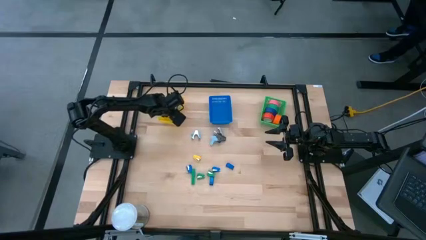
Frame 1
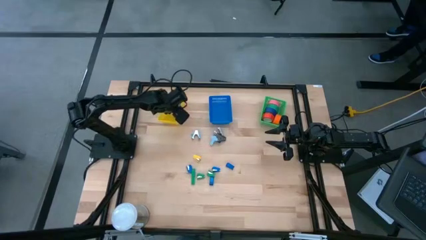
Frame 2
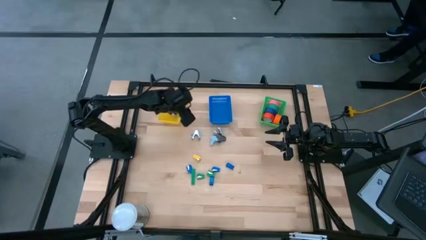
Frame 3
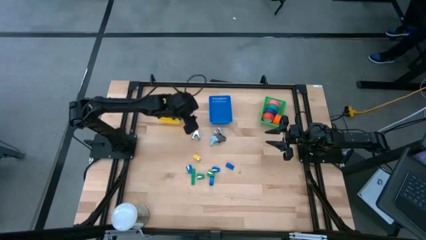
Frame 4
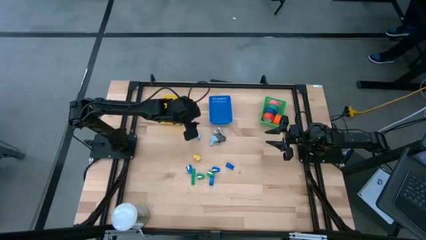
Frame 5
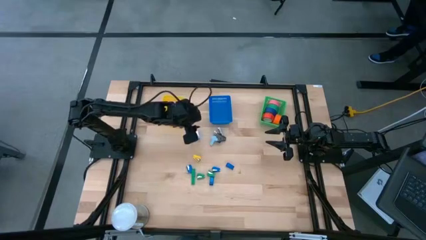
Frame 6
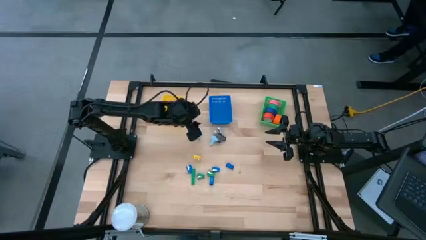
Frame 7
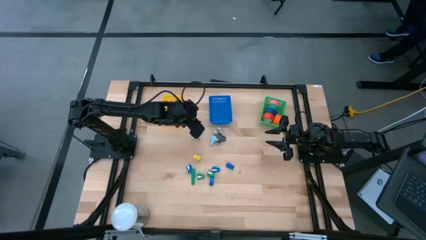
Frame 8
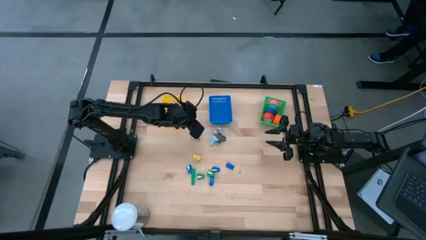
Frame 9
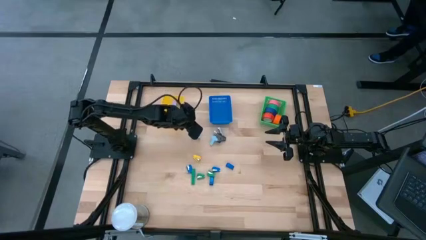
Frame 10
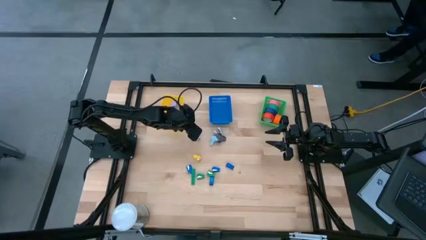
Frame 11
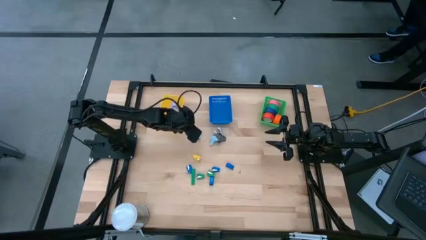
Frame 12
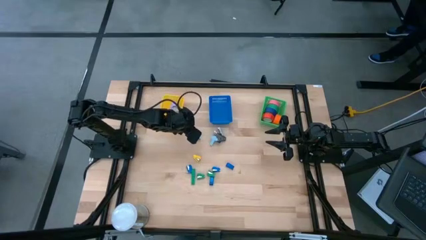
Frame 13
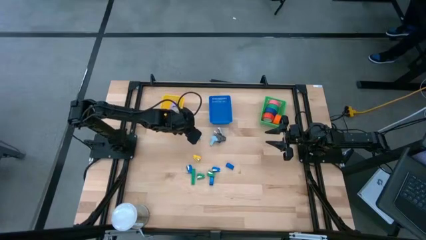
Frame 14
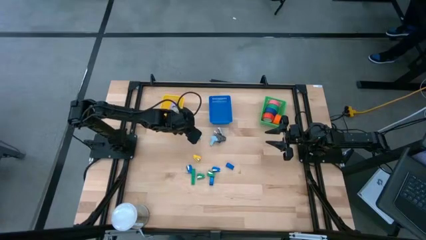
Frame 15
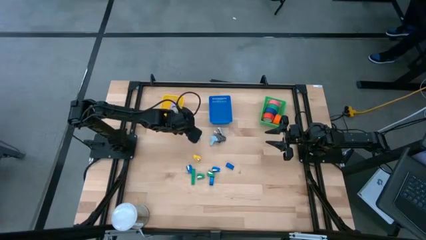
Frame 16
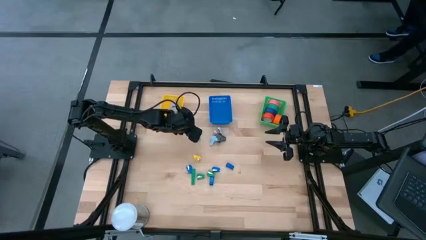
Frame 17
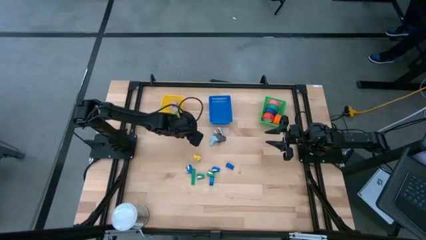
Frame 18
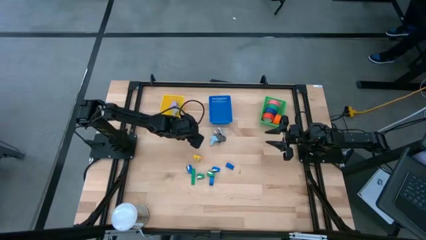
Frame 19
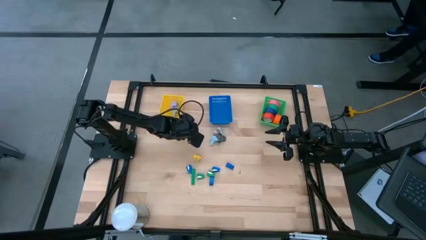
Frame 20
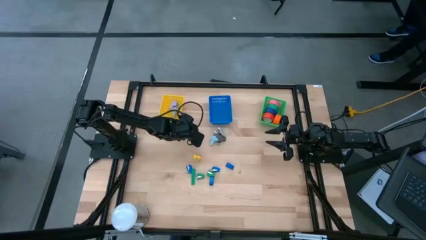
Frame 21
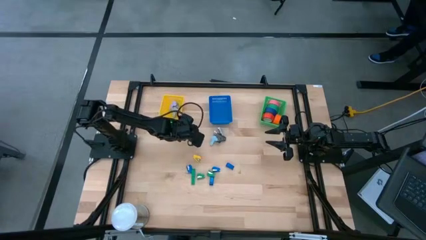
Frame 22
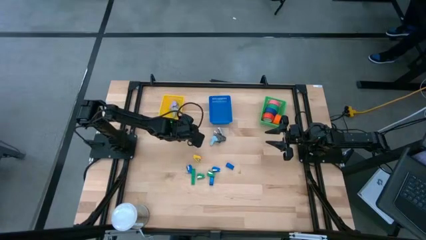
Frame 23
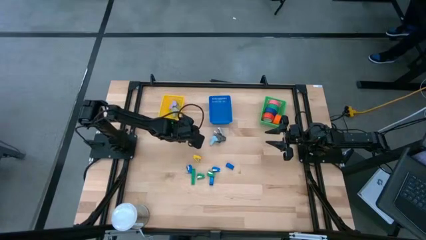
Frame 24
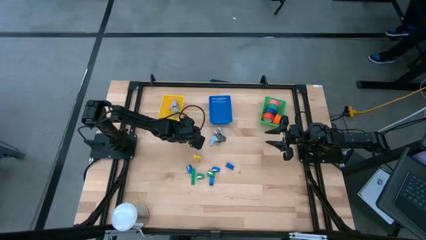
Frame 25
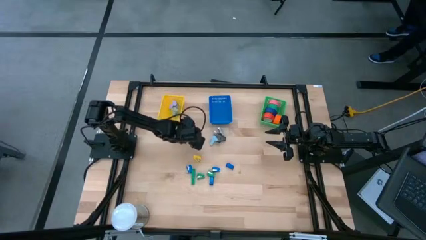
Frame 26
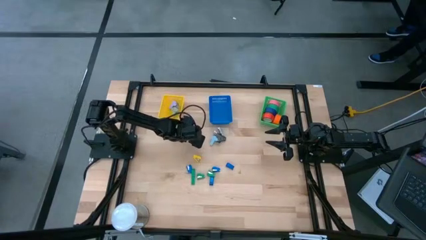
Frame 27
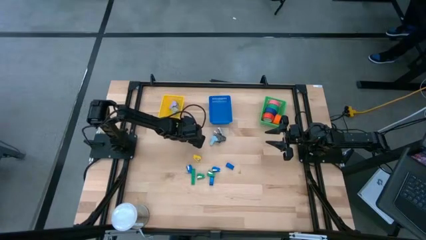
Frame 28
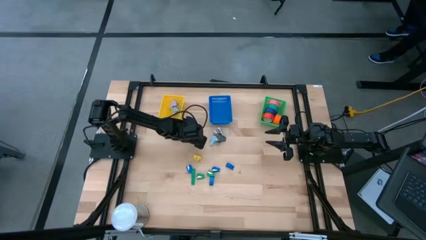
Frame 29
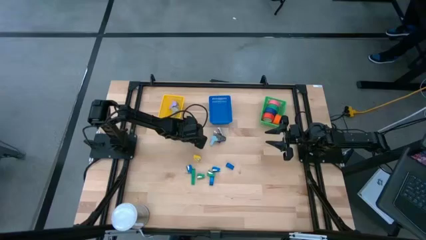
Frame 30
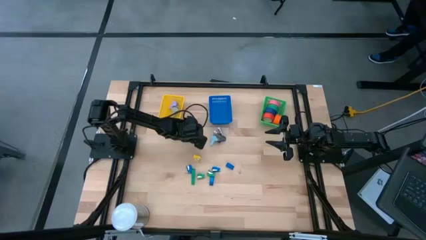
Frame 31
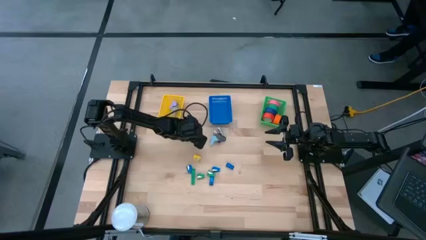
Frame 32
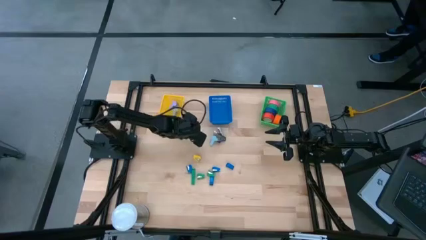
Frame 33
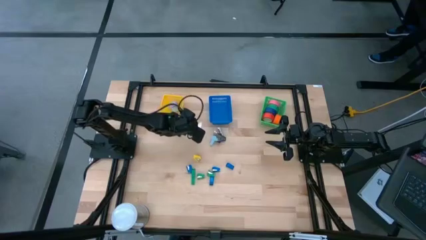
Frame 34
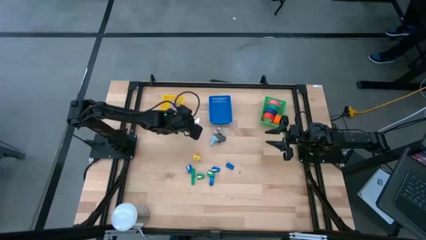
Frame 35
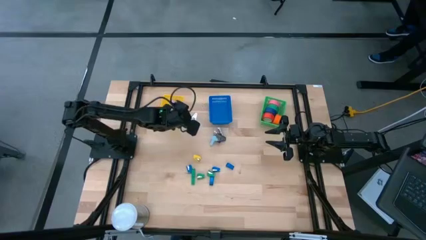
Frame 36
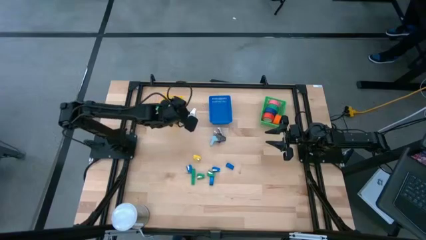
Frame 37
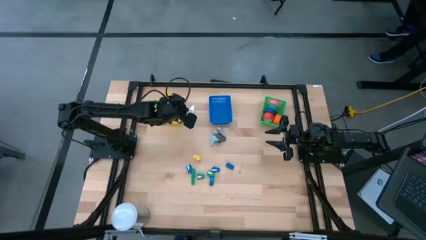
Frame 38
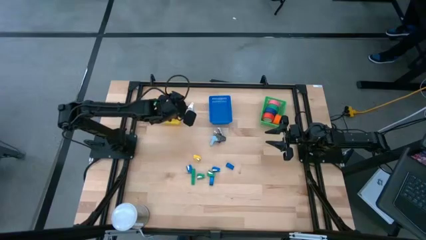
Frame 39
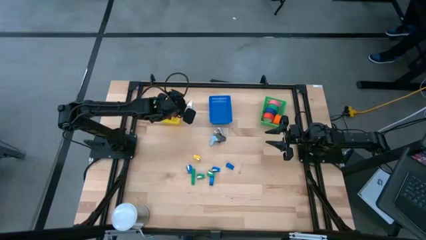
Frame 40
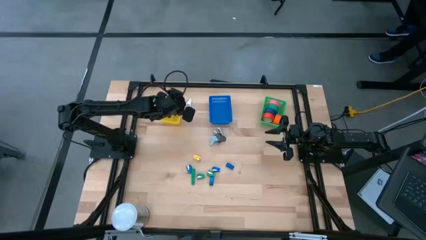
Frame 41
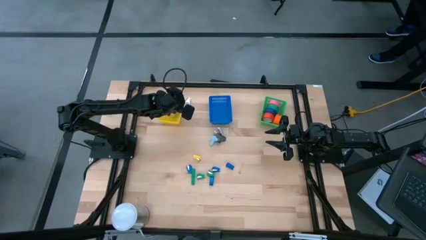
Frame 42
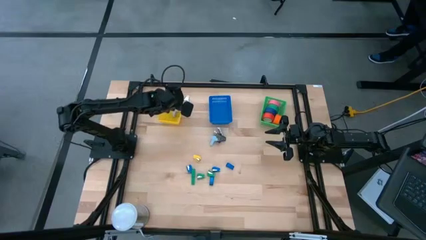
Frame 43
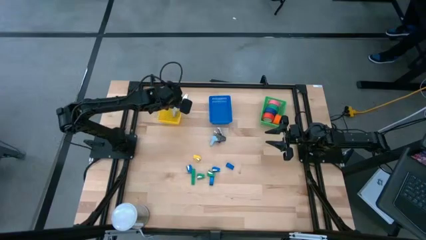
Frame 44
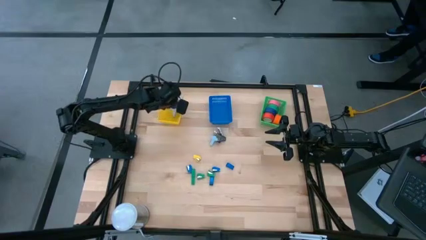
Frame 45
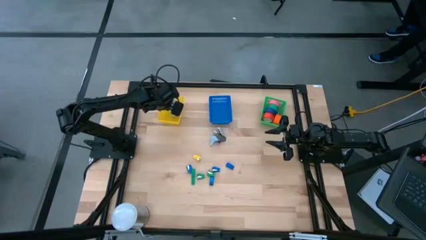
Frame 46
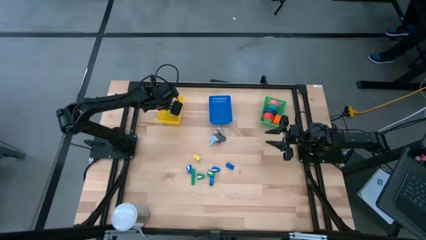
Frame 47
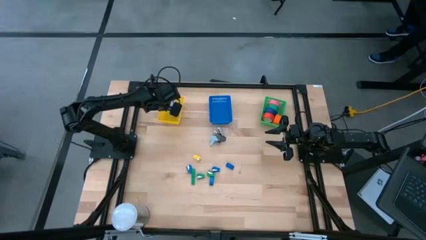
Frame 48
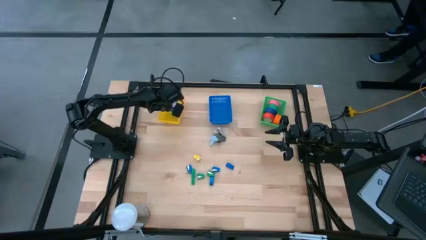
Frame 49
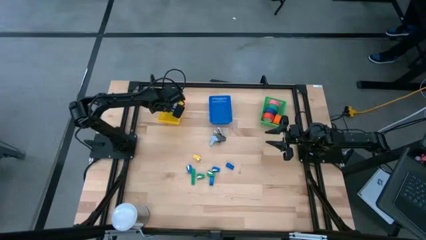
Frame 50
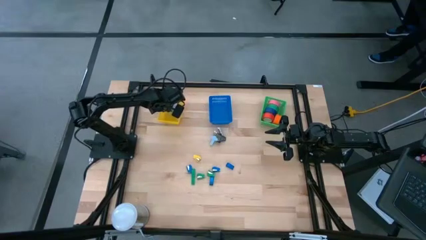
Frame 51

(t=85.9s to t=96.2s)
Task: Pick and place Stapler, Stapler remover, tape
Put the blue staple remover into the yellow basket

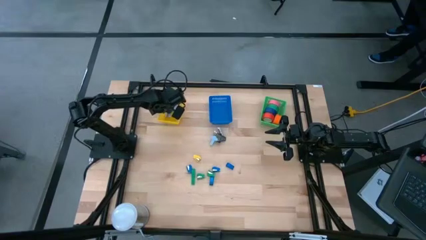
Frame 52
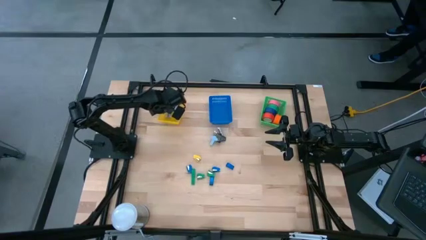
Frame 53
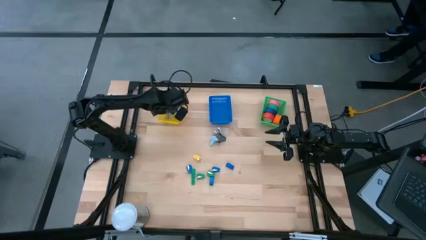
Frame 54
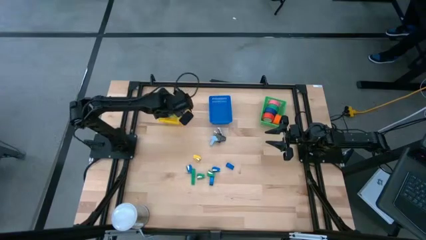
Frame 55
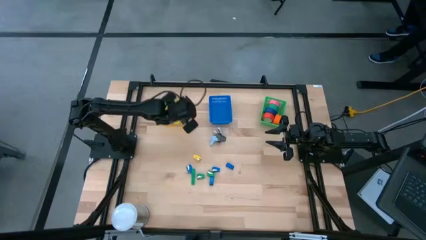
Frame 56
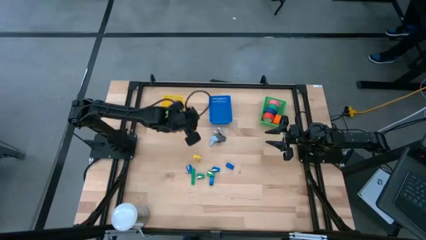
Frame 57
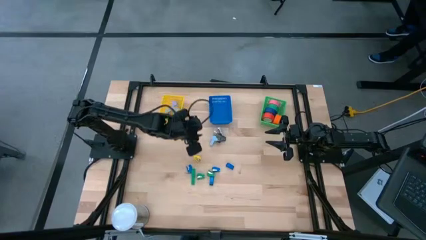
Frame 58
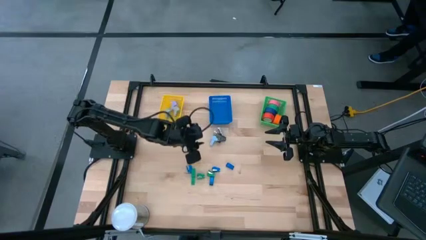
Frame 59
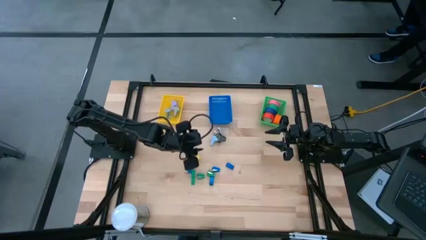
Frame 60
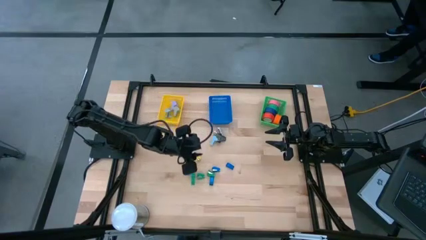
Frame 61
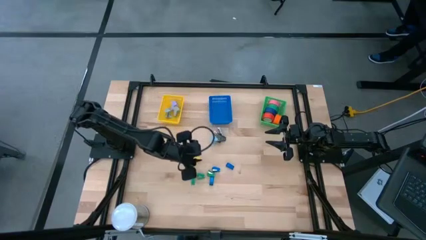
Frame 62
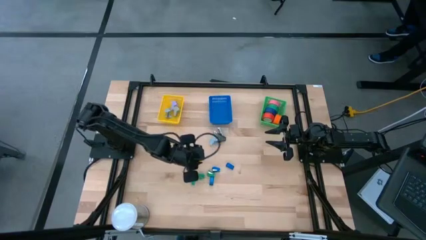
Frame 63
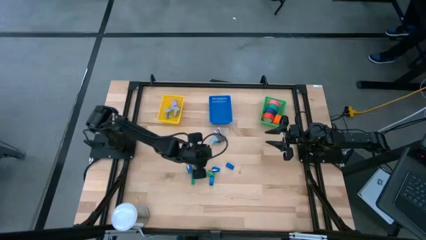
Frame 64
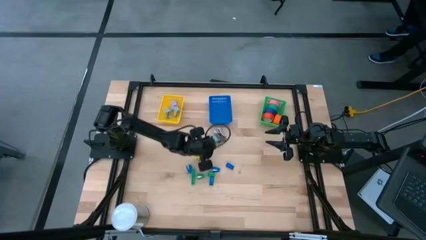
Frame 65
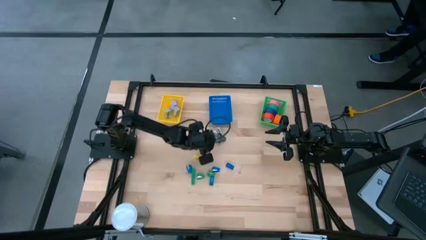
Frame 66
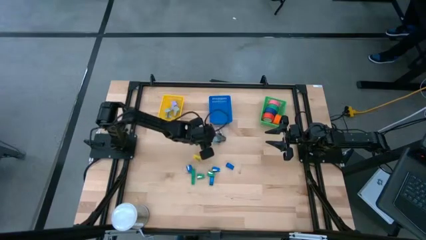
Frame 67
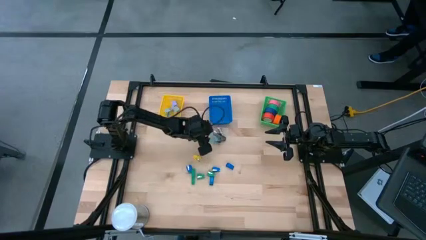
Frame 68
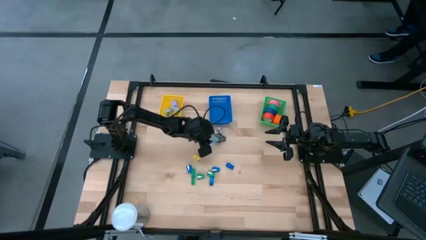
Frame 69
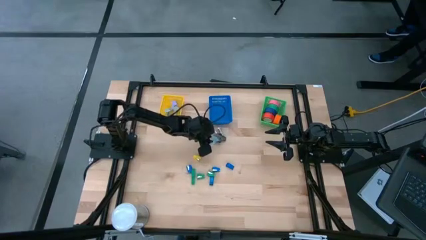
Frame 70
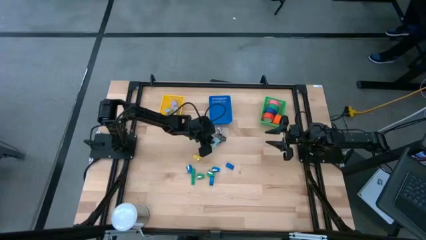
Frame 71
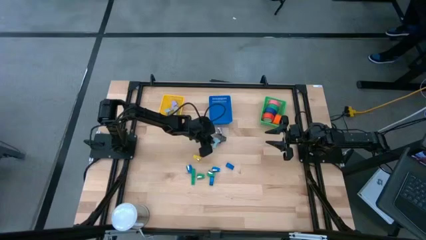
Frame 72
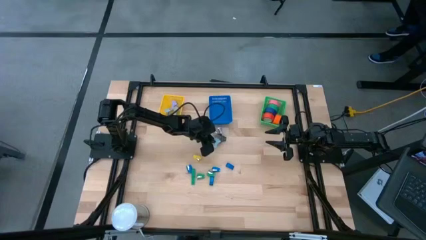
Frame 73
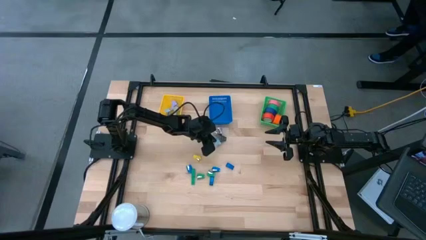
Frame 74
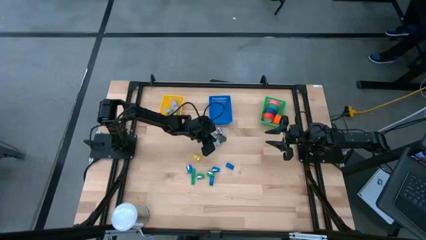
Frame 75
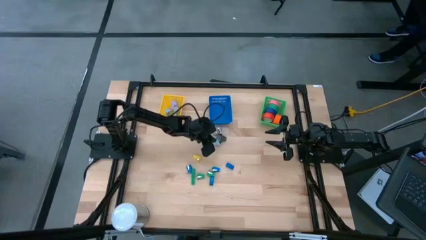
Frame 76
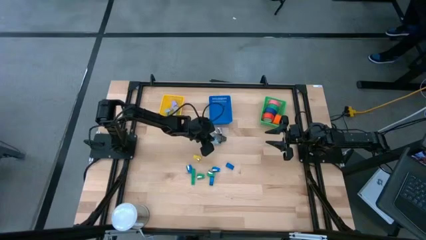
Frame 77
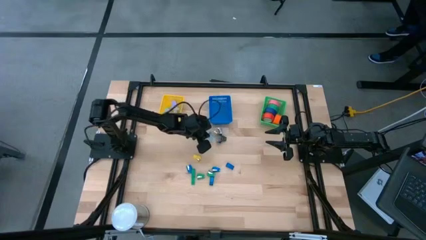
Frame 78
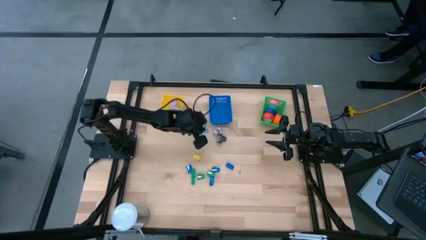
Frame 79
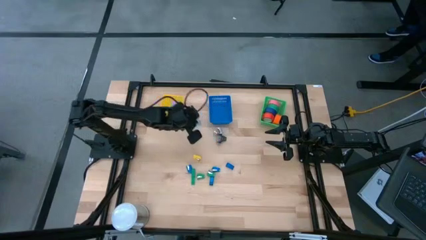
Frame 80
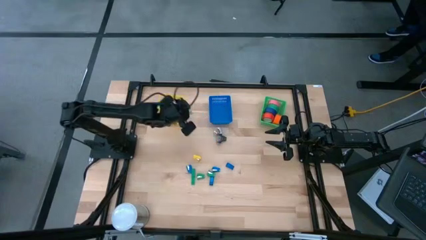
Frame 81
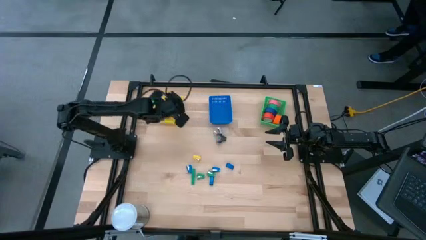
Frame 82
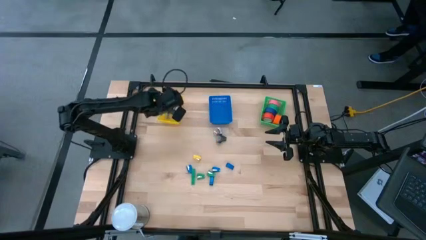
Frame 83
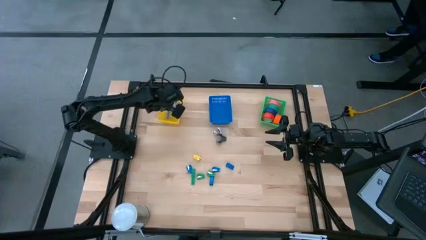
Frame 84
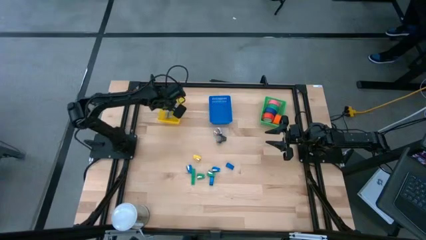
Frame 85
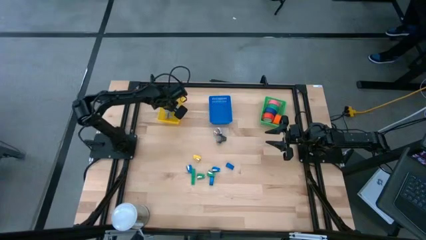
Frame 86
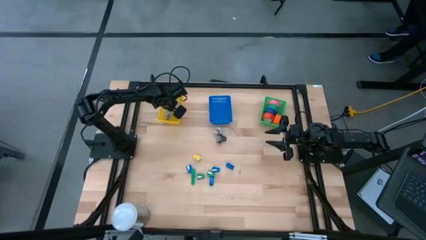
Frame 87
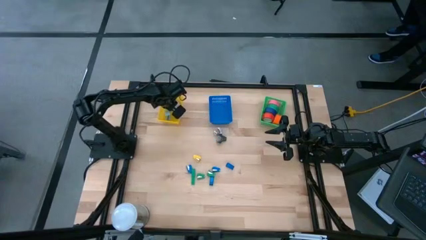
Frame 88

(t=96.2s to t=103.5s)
Put the blue staple remover into the yellow basket
